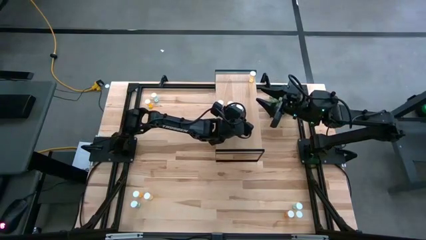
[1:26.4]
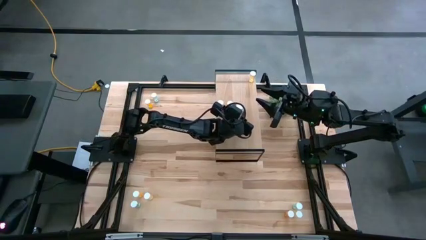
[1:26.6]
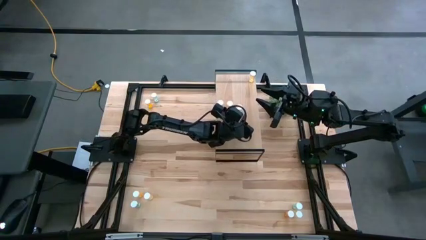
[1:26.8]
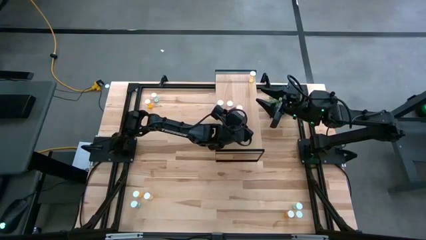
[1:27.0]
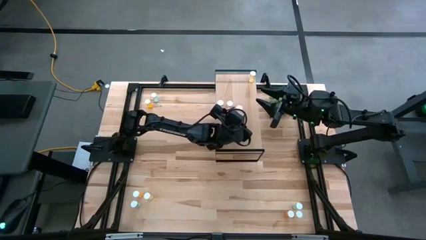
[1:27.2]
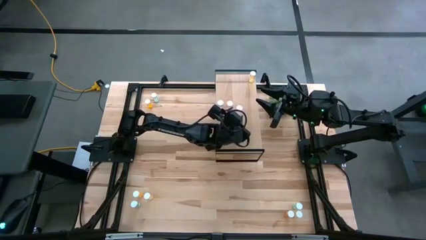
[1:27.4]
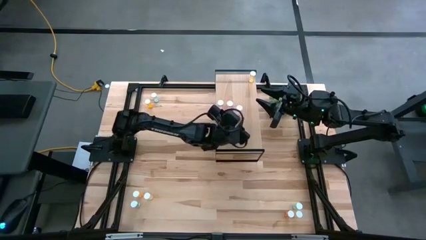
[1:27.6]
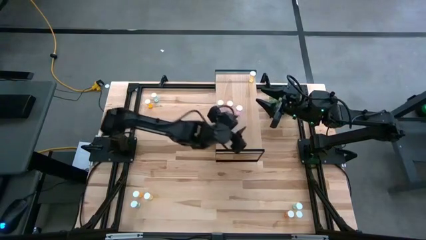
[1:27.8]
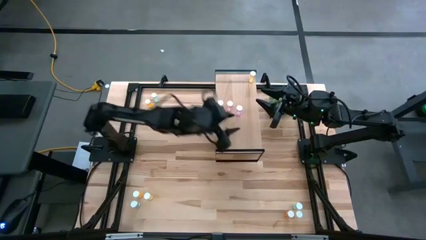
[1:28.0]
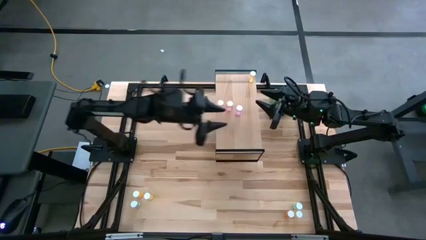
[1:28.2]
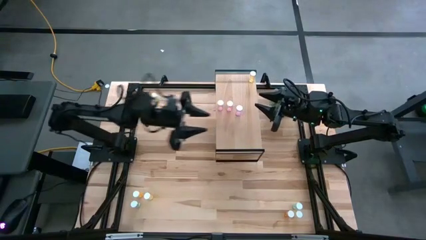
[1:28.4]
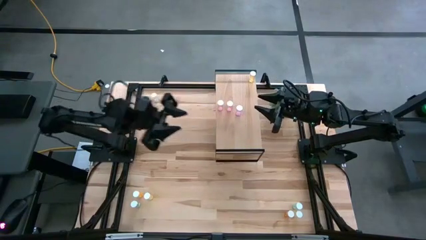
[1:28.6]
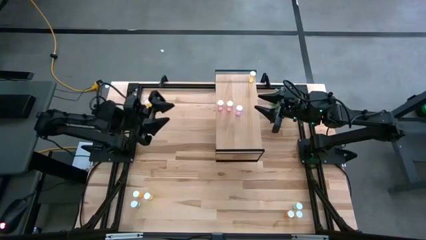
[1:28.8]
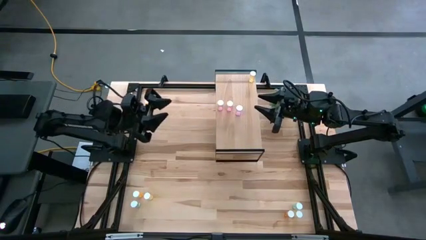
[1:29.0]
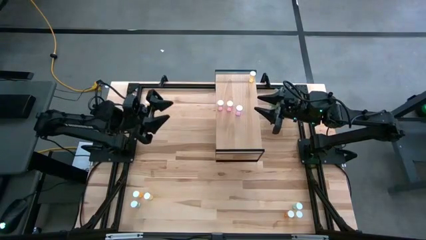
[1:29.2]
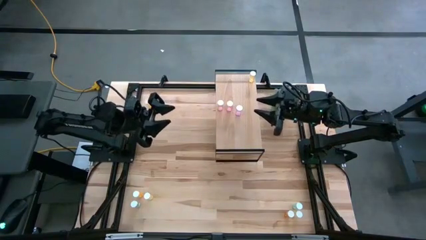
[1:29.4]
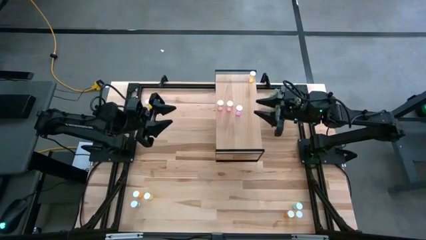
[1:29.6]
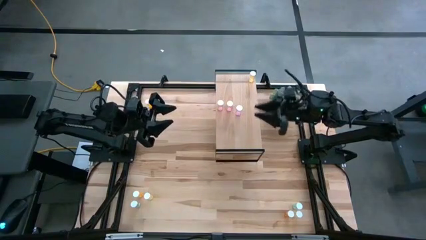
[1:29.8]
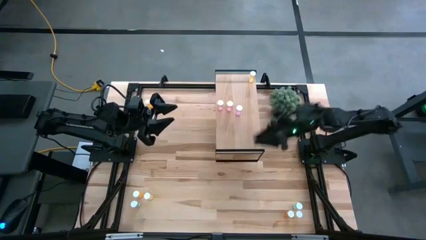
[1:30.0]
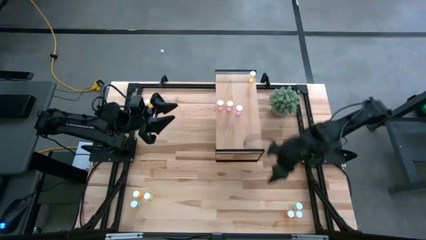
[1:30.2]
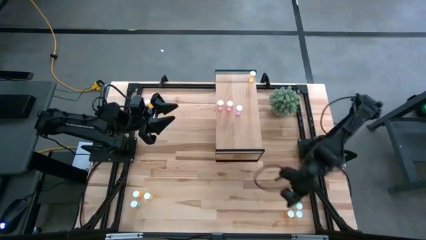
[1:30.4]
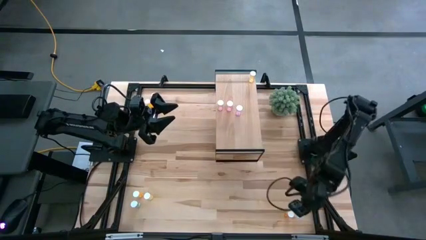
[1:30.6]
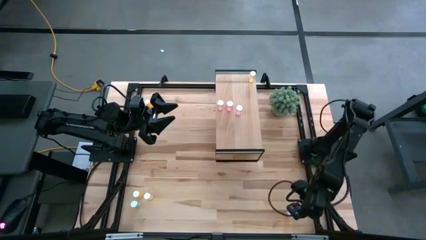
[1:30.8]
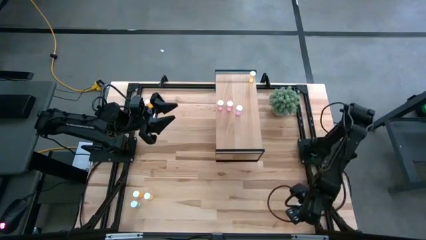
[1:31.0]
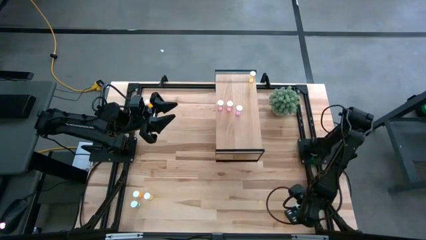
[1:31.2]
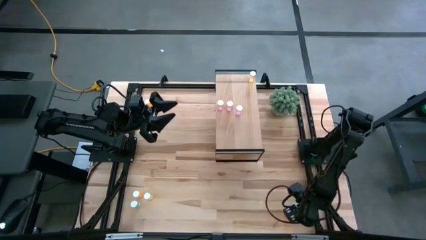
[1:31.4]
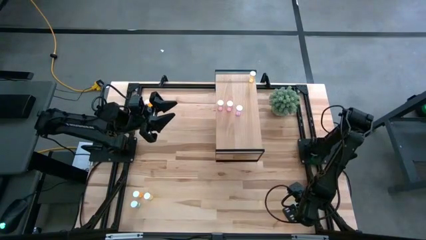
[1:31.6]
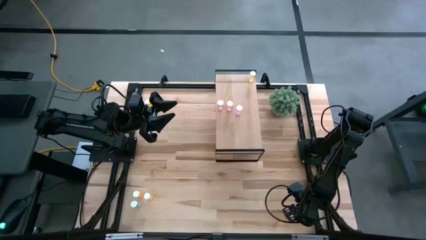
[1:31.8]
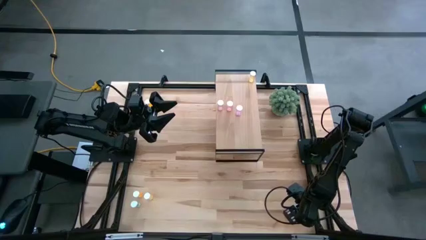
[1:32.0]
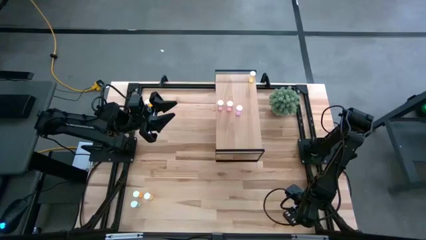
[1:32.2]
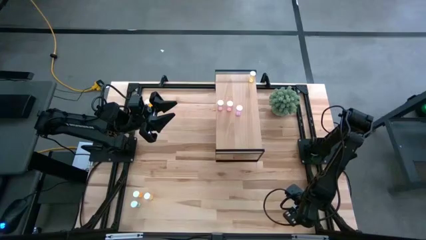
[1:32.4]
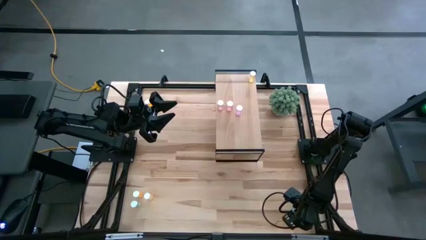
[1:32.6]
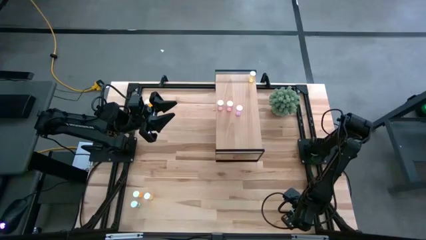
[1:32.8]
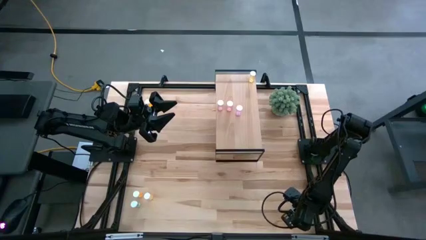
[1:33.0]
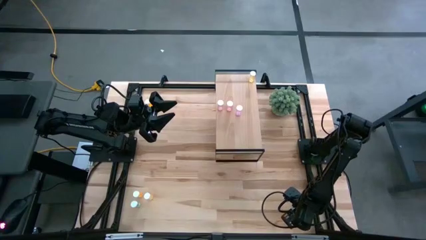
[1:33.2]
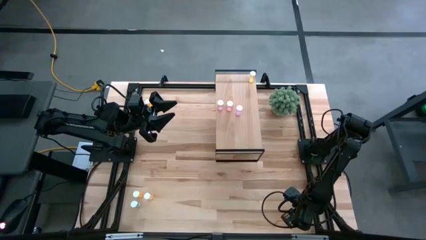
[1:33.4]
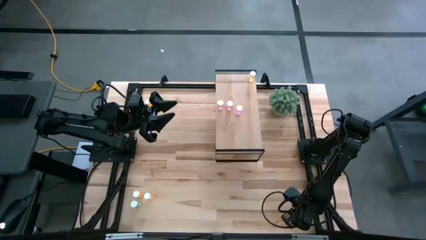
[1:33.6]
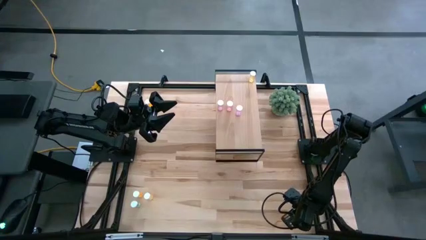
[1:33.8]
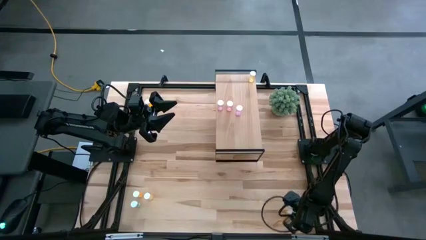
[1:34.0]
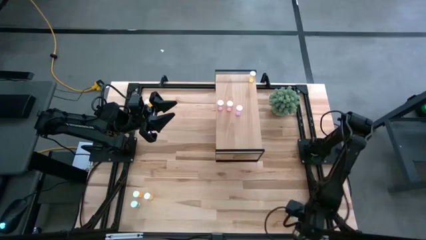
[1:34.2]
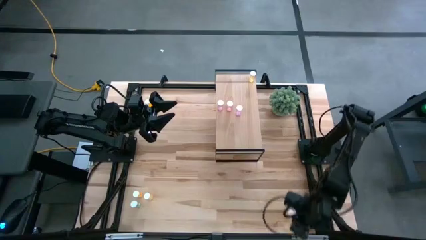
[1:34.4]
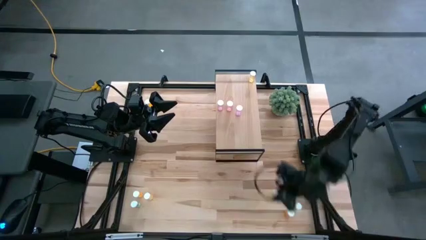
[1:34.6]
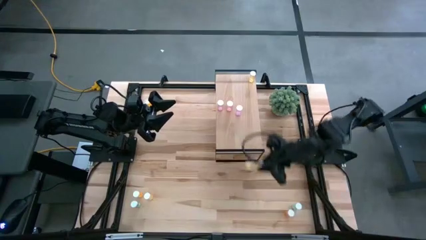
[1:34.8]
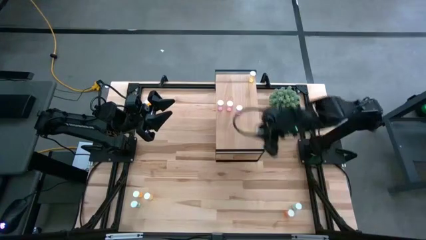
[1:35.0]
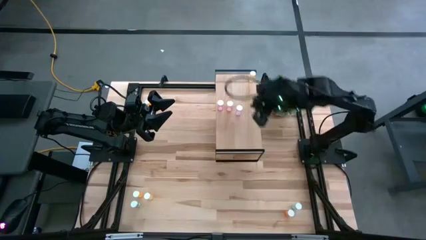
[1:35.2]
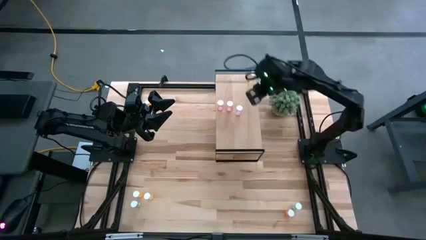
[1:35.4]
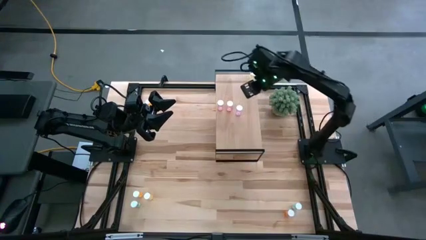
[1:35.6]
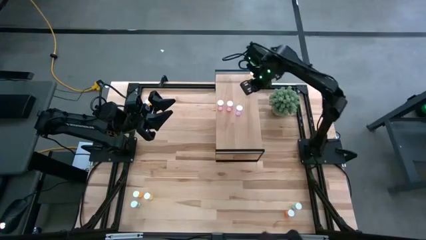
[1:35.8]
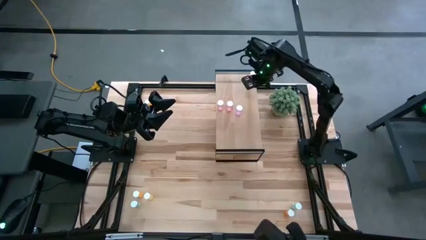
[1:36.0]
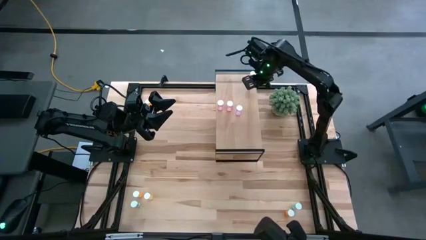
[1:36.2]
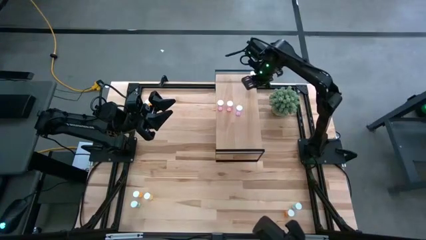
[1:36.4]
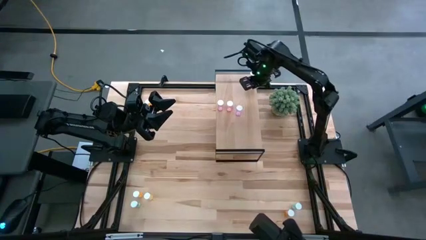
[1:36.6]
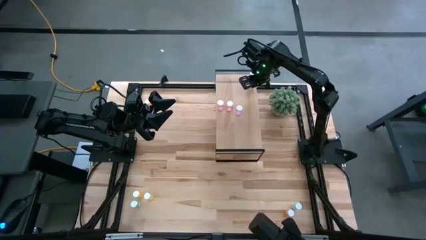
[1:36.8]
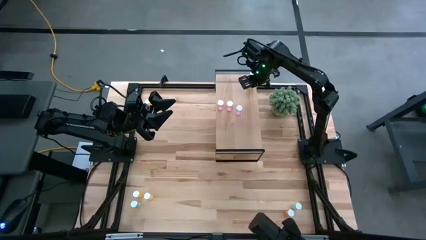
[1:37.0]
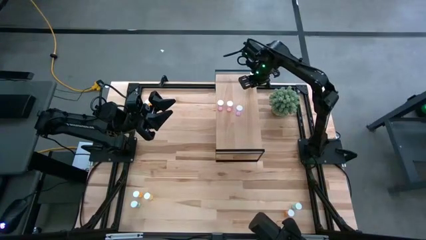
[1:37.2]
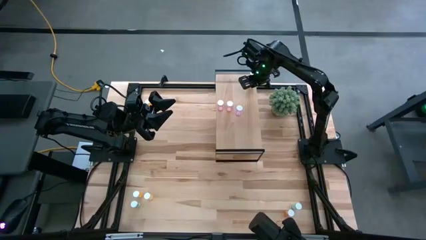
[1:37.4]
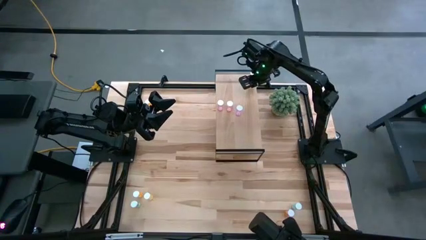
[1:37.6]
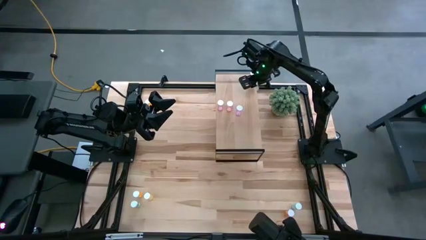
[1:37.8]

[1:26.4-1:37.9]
Task: Pick and place medicine bottles onto shelf by color
Put the bottom yellow pill bottle on the shelf aligned with the other yellow pill bottle

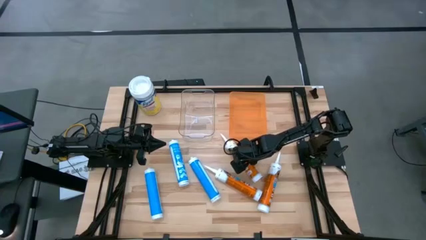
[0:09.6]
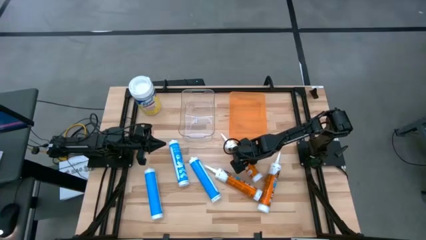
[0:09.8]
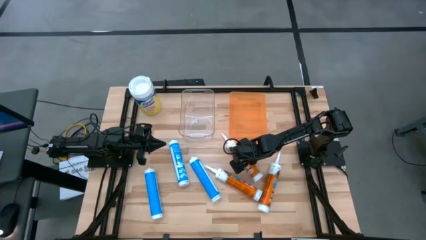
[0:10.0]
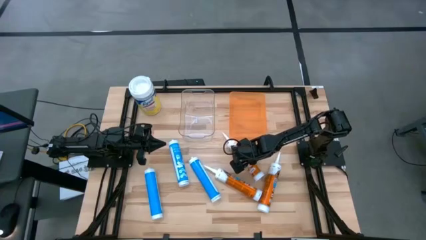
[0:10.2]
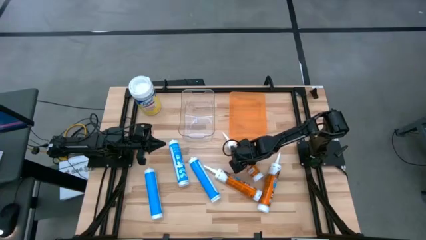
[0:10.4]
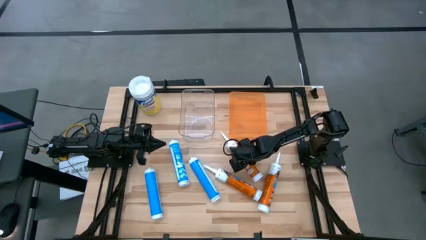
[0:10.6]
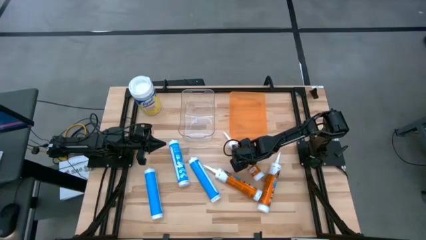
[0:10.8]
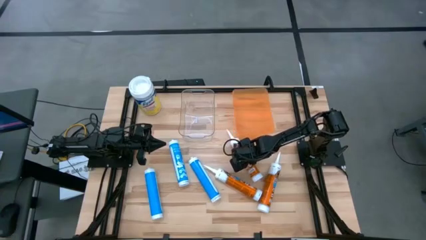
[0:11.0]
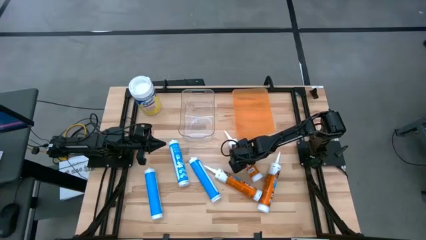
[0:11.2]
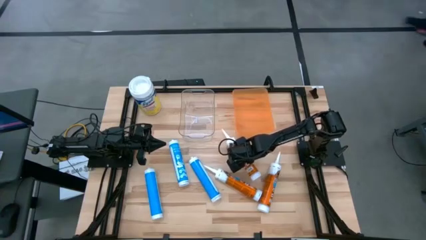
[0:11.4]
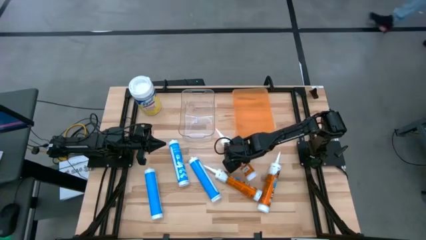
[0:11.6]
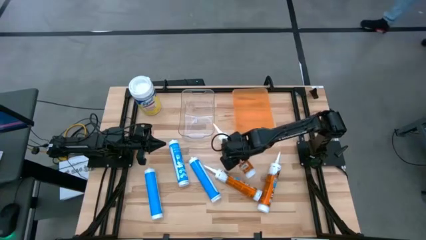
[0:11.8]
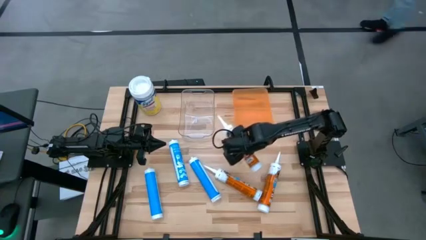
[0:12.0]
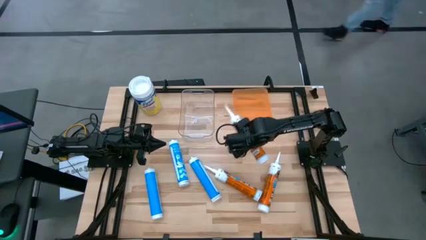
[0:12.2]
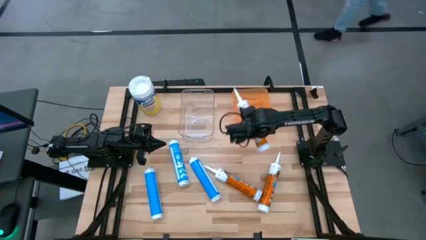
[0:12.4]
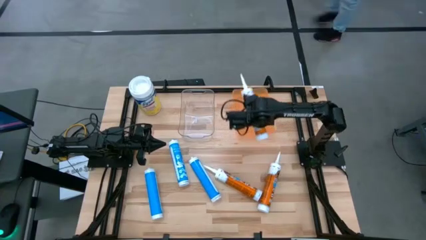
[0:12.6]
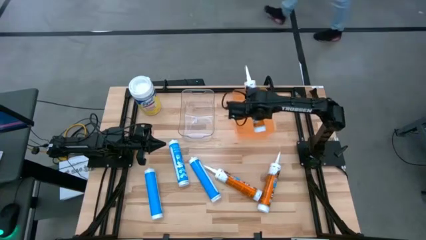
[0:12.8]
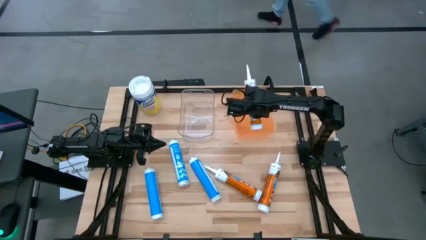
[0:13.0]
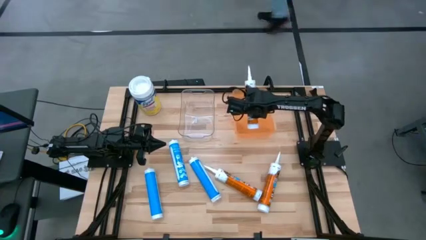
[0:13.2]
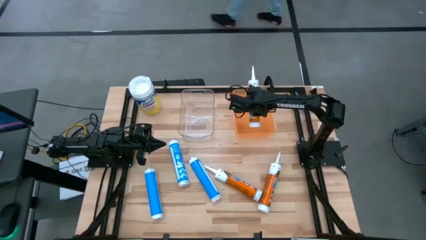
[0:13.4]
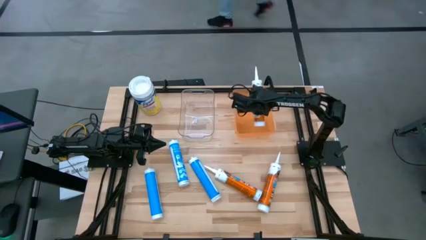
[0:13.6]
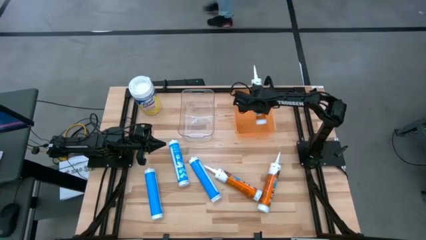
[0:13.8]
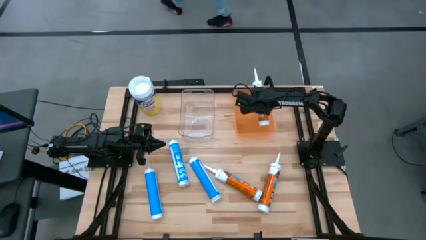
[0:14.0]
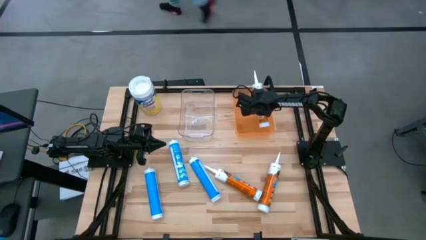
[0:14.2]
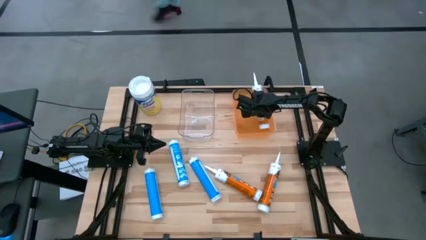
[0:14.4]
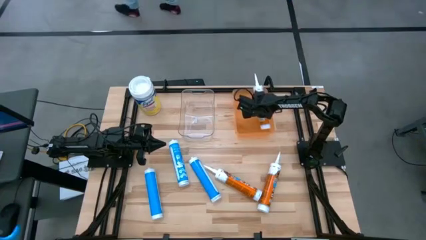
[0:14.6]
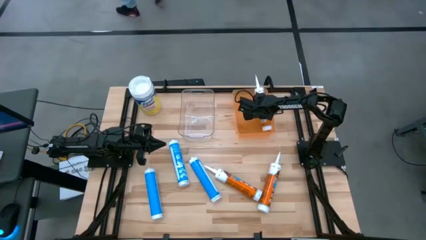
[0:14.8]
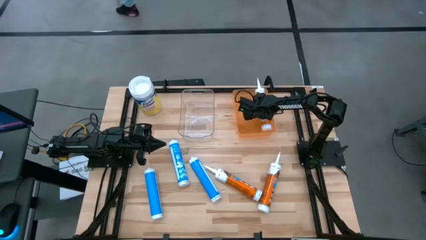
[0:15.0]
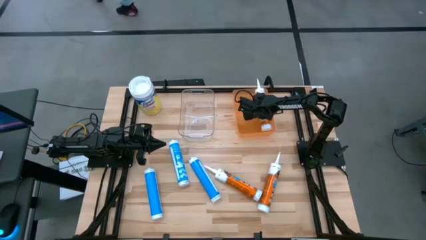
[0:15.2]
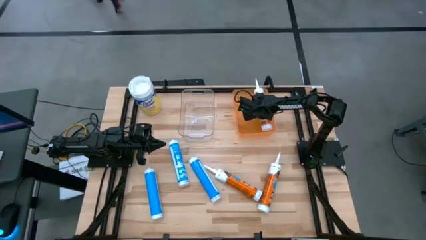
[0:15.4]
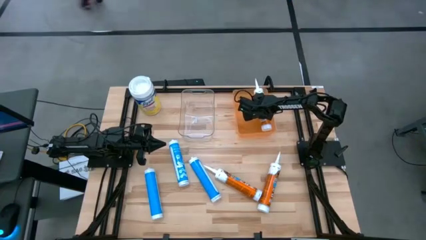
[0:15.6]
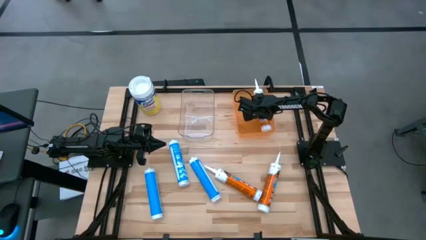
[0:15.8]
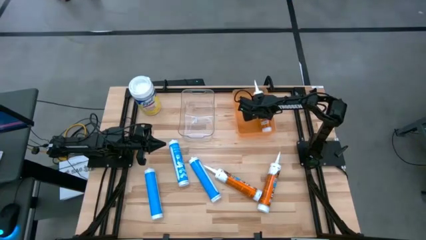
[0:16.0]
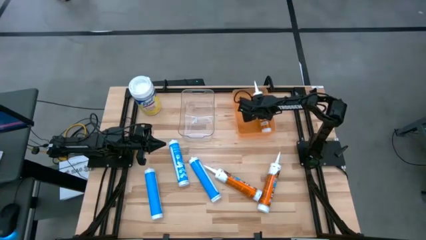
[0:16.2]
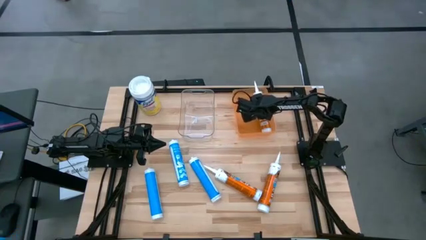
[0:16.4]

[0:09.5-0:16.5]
Task: Pick & place silicon tubes, Sealant and Lysol wipes
Put the middle orange sealant into the orange bin
